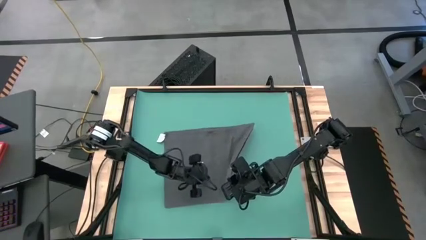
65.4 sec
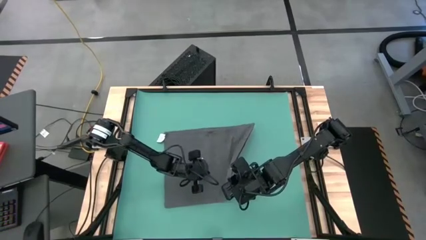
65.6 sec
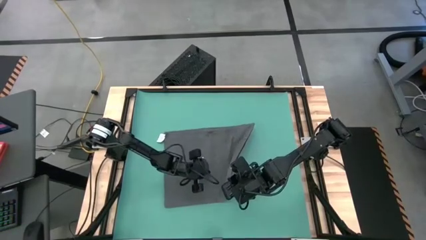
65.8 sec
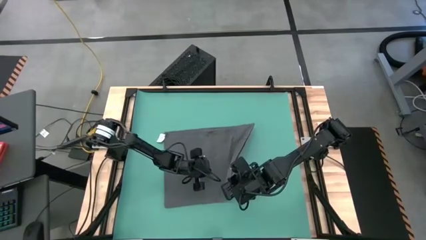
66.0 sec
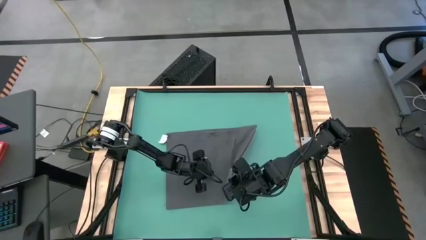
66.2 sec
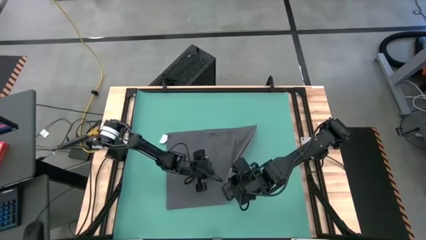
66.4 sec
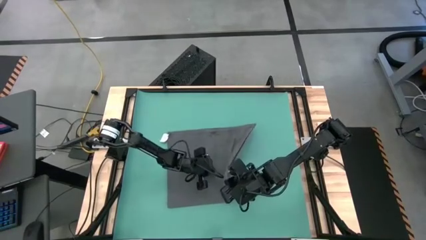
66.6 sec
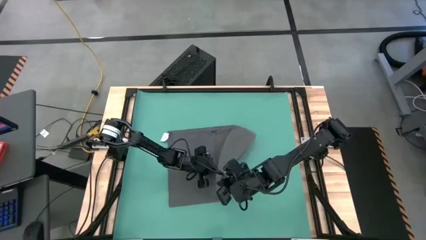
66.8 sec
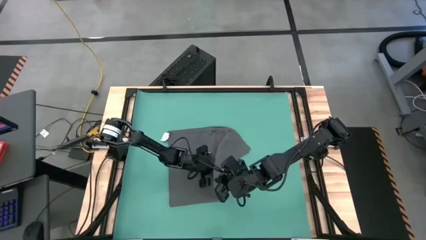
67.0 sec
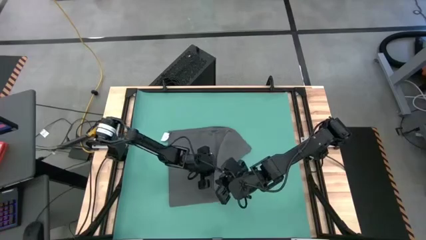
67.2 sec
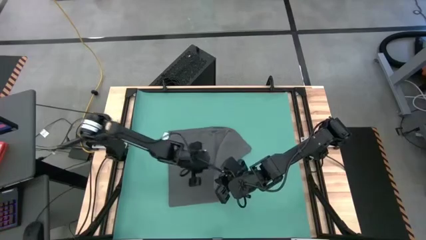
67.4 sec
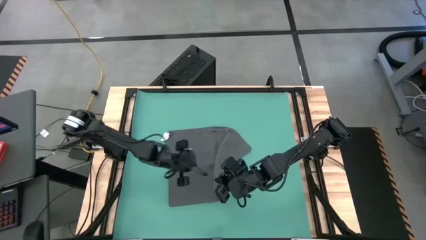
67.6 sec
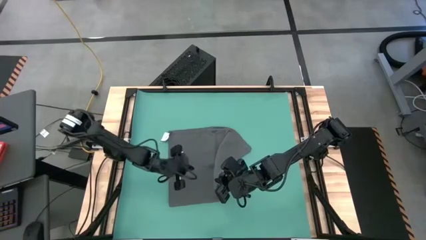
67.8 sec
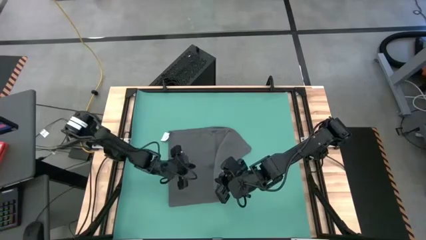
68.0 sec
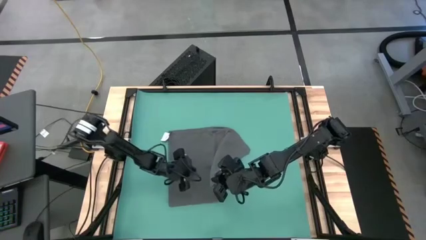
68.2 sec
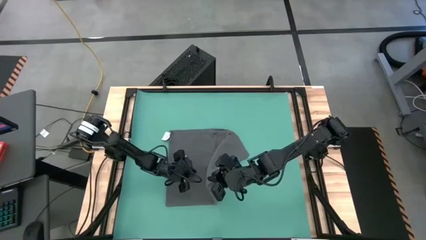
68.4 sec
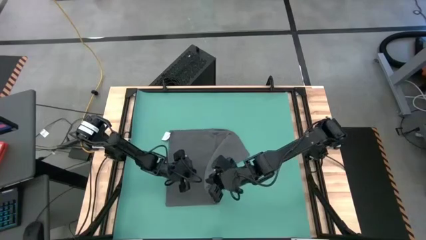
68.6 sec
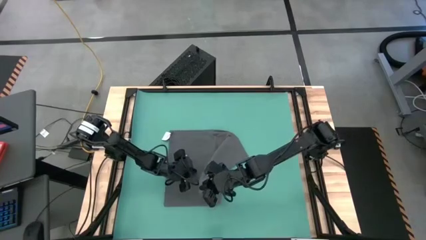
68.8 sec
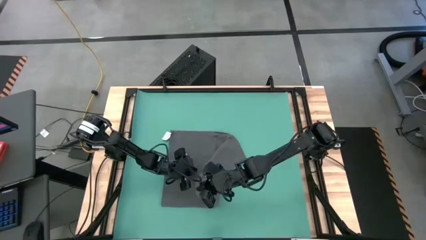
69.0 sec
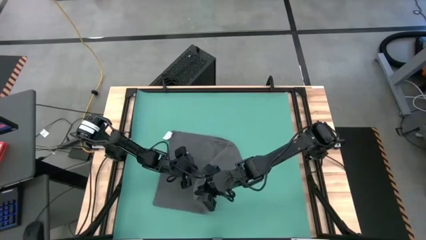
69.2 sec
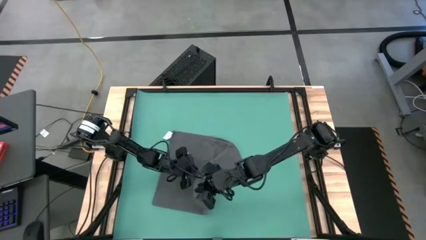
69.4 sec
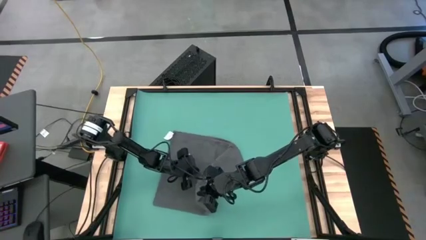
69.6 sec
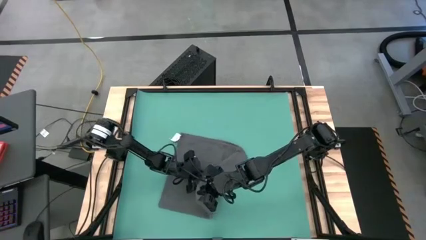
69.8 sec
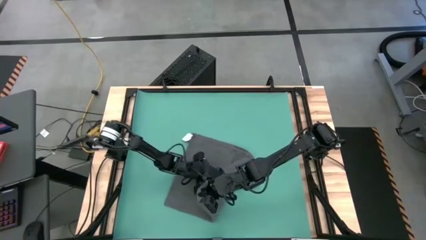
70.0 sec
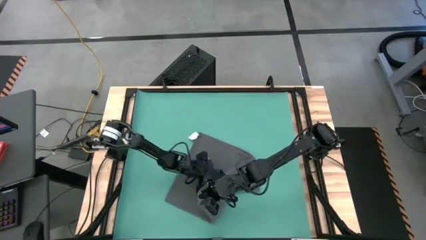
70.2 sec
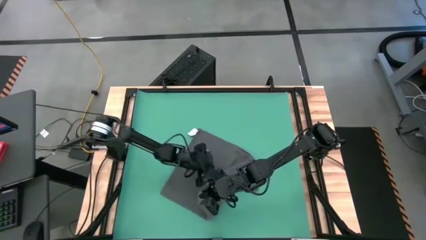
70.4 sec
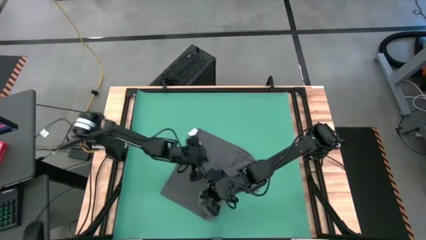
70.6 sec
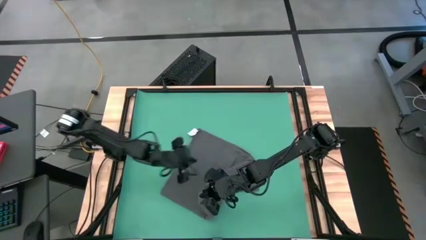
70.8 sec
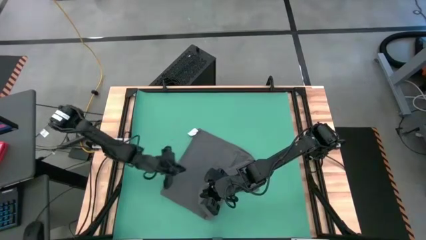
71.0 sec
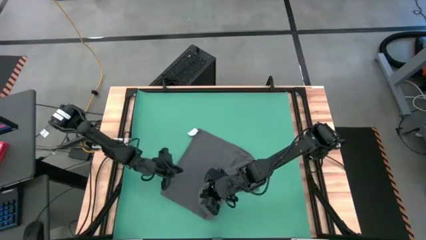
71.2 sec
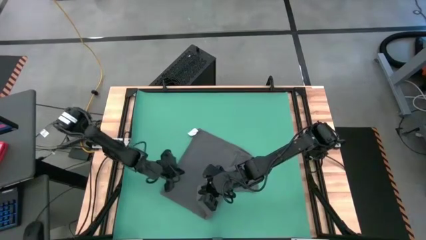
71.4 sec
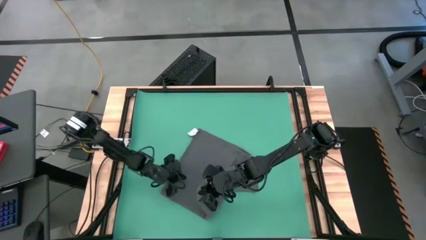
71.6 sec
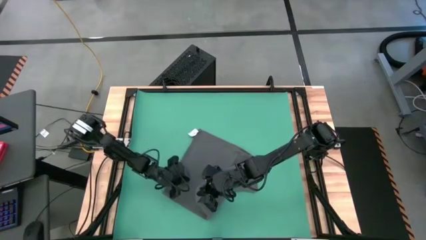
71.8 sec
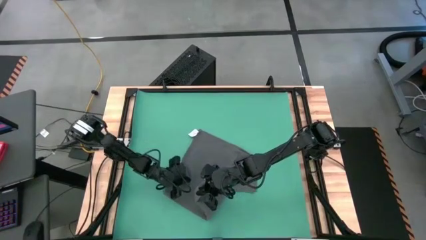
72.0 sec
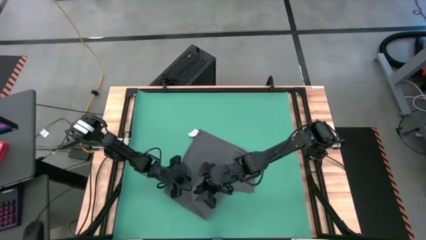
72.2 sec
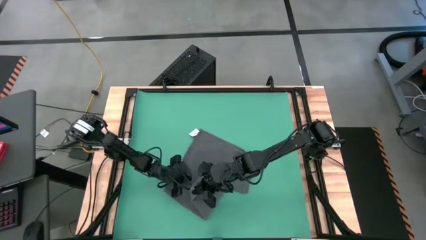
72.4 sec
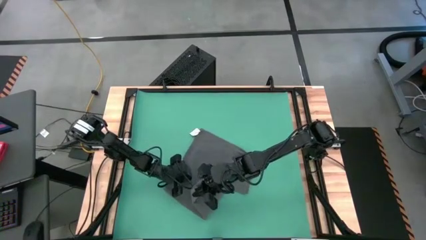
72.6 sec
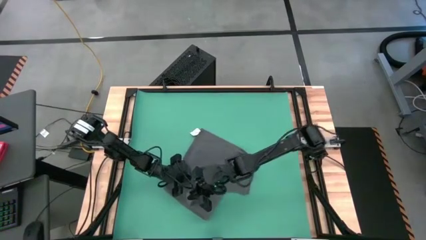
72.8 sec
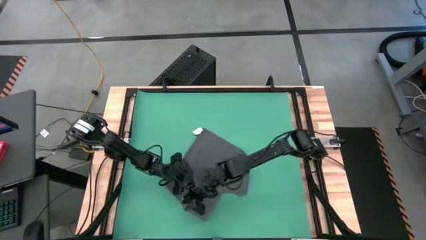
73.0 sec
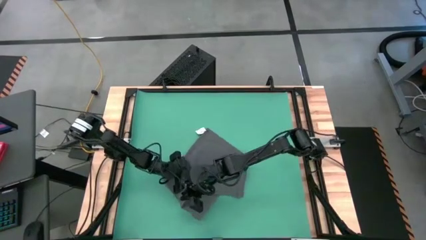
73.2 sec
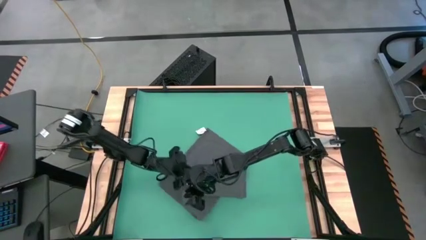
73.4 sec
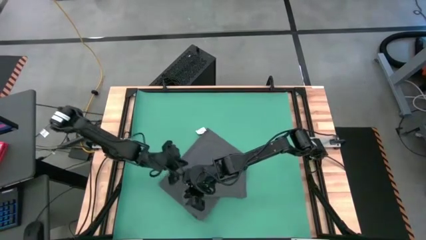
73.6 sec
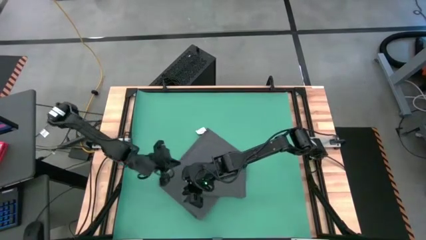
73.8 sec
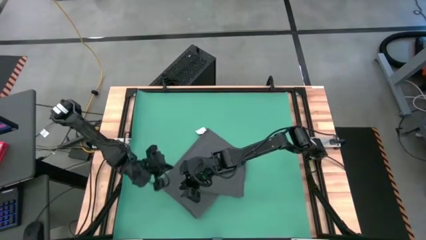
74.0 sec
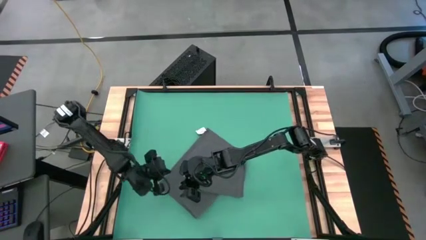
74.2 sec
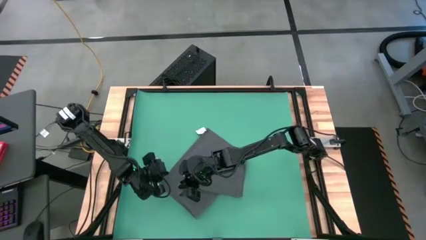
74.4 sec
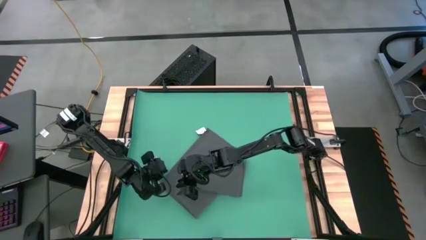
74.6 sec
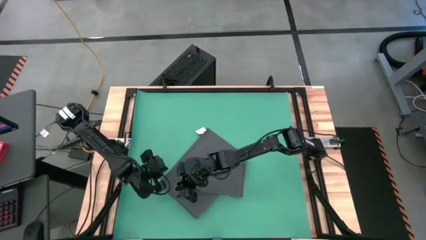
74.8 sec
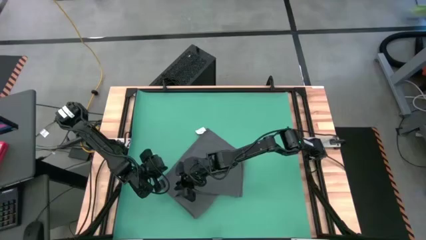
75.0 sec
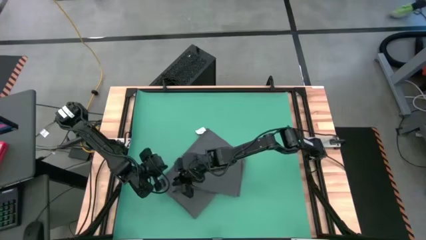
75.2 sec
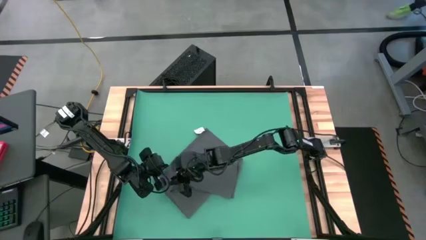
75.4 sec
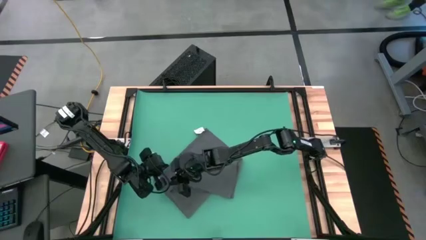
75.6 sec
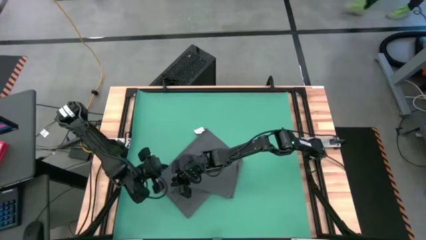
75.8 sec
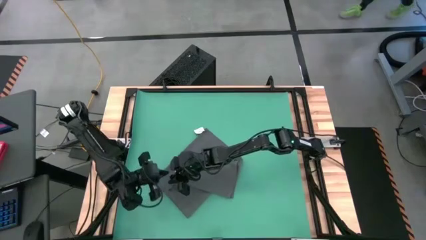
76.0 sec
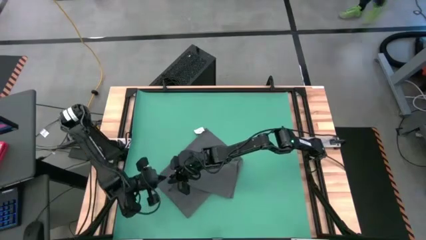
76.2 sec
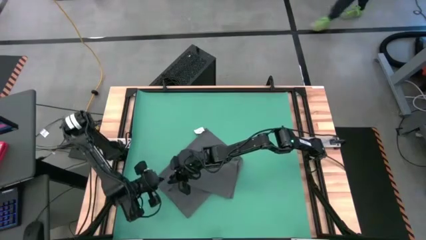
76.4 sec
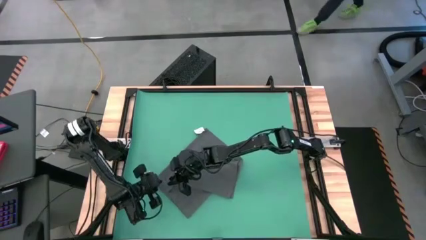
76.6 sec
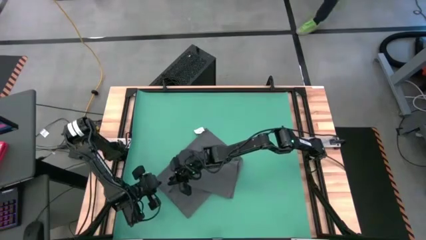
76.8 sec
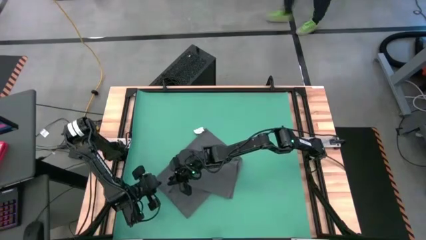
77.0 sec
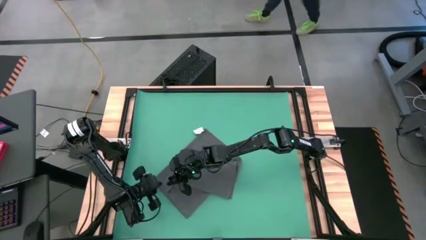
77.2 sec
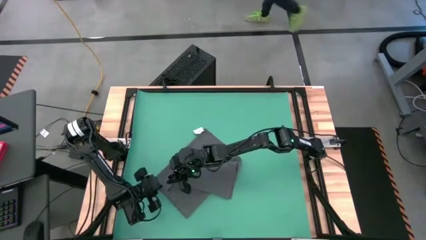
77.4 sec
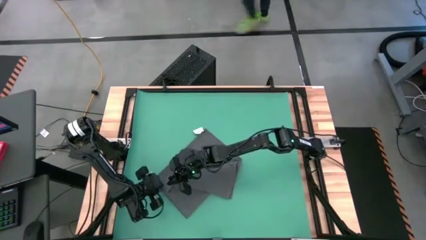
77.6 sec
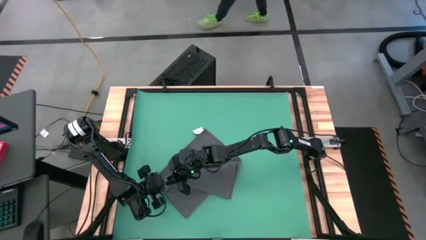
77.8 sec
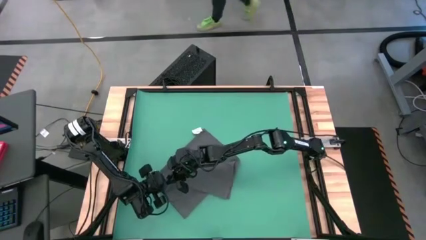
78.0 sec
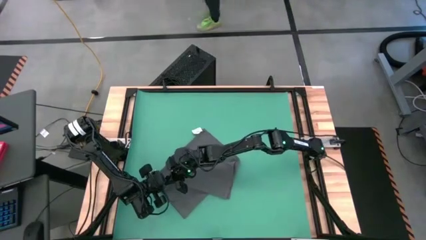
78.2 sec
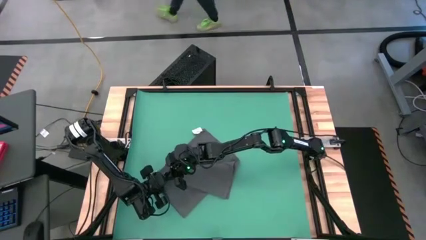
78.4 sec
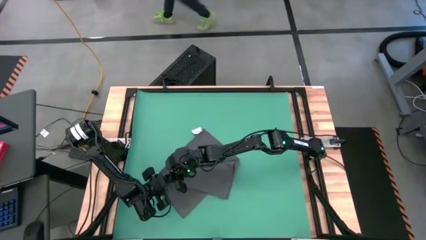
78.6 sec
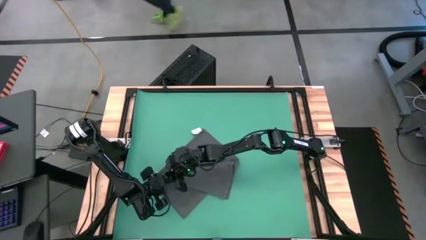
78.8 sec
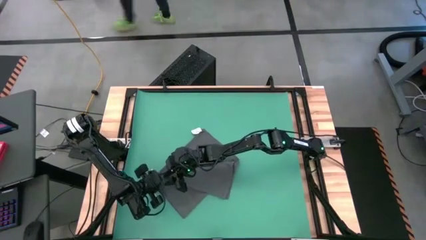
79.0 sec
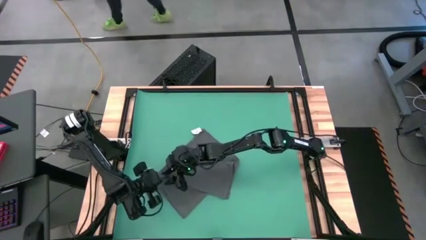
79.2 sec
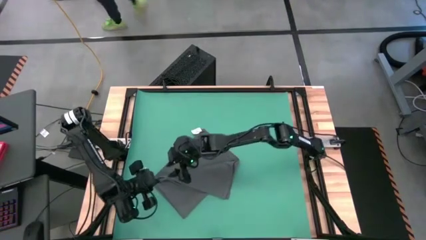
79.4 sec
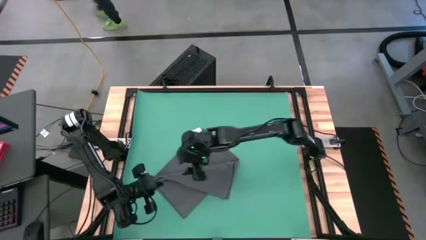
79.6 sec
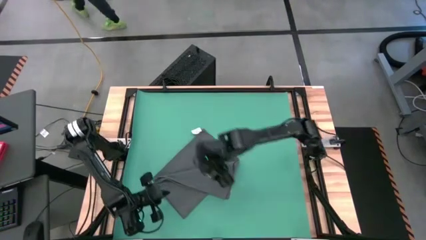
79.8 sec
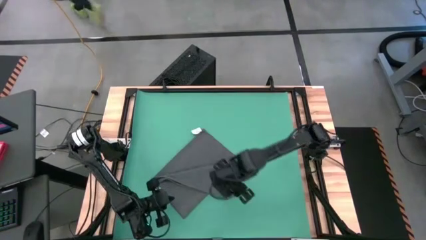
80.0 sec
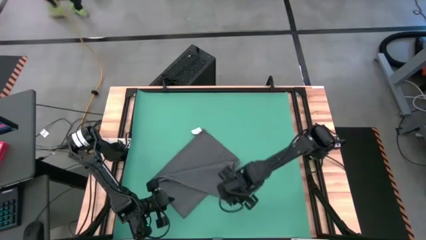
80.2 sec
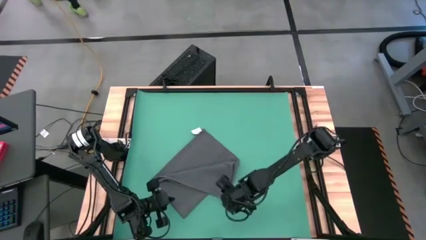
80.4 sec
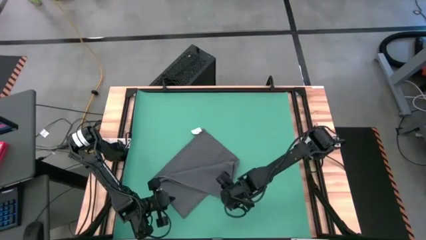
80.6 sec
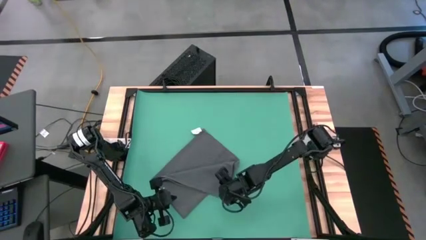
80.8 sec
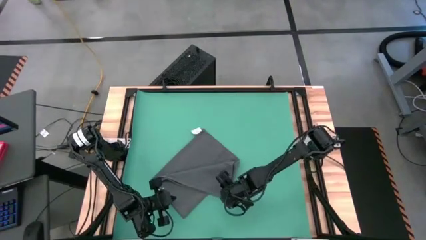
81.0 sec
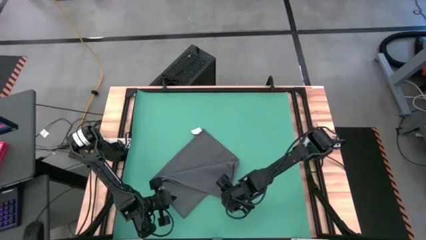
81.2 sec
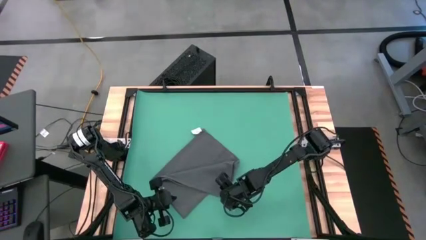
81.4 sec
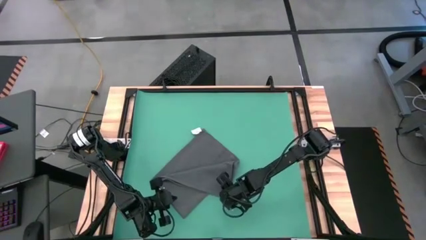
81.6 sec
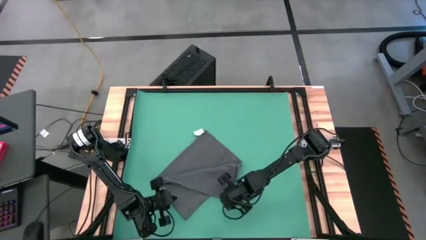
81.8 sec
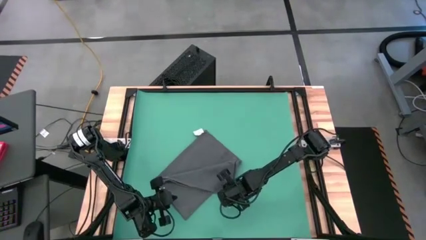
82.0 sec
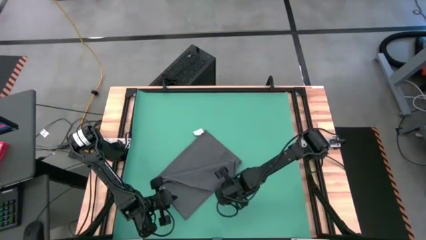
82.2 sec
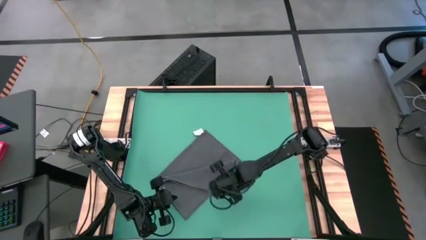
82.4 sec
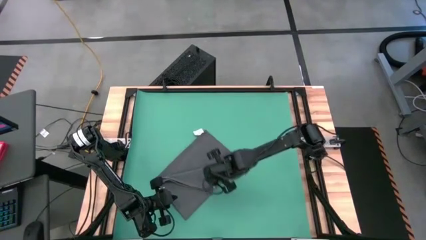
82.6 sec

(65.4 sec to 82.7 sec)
Task: Roll towel
Roll the gray towel on the table
